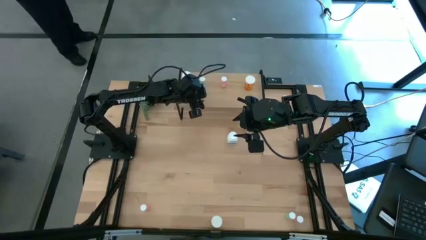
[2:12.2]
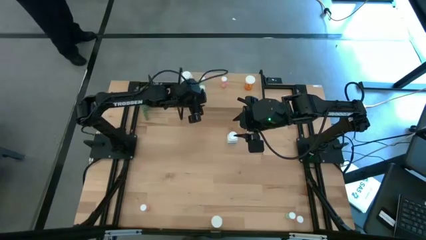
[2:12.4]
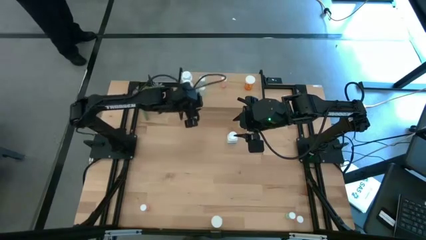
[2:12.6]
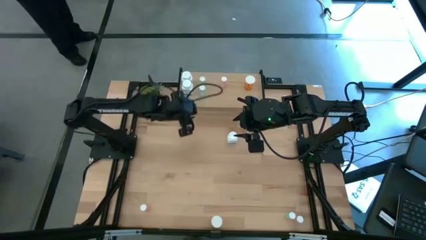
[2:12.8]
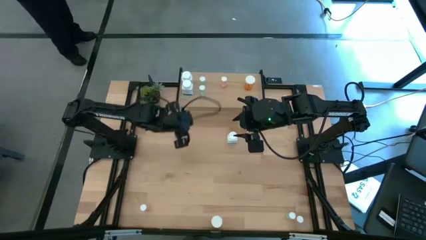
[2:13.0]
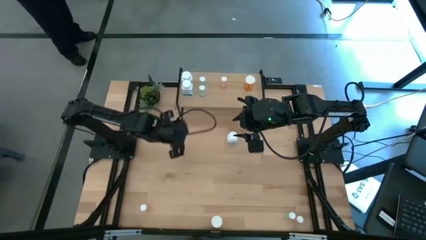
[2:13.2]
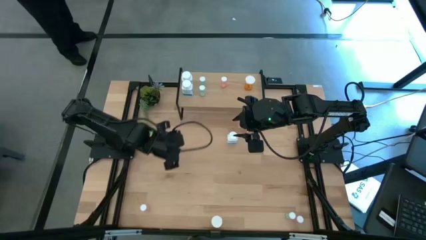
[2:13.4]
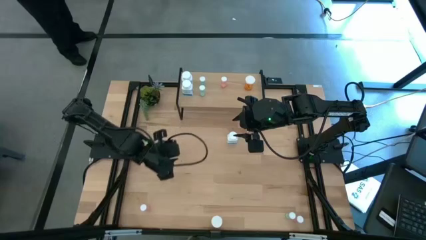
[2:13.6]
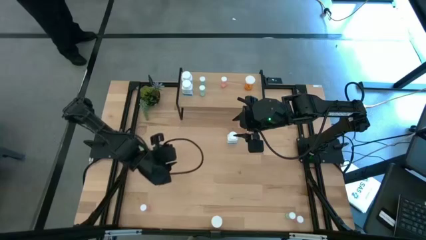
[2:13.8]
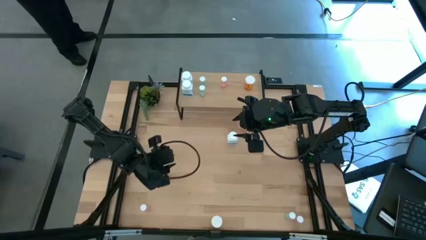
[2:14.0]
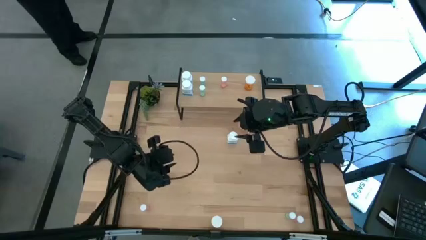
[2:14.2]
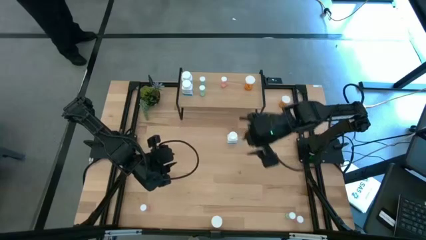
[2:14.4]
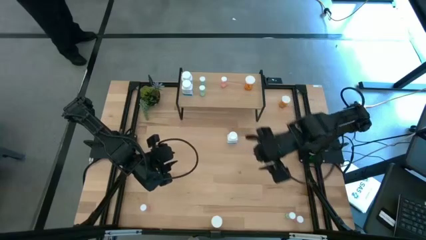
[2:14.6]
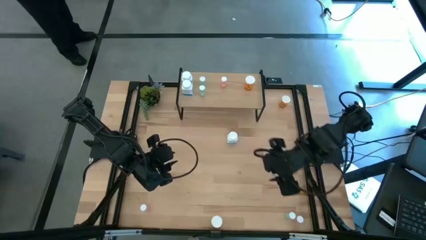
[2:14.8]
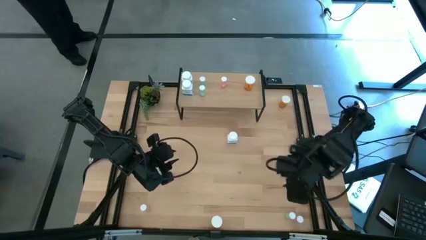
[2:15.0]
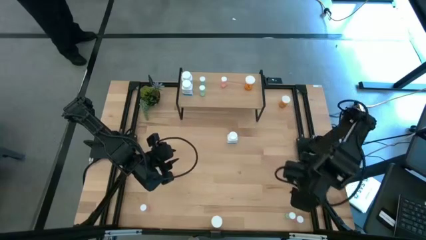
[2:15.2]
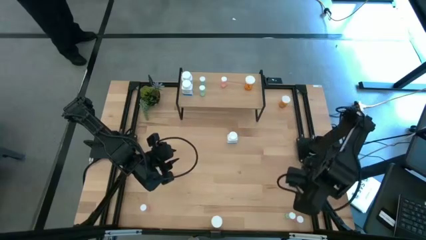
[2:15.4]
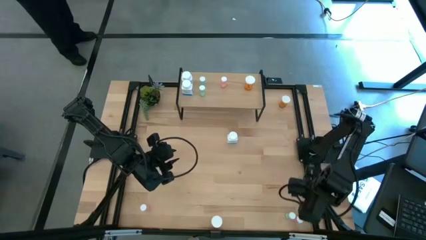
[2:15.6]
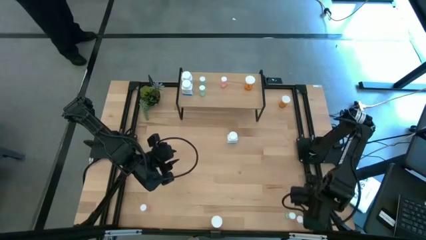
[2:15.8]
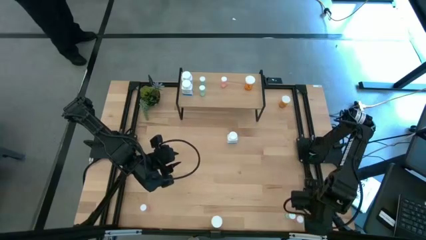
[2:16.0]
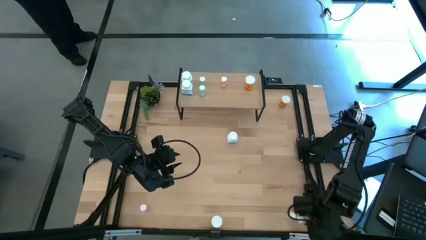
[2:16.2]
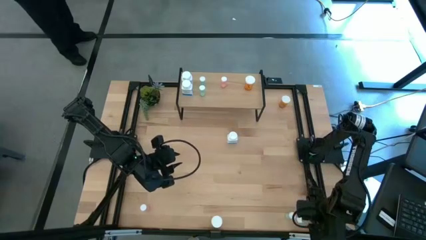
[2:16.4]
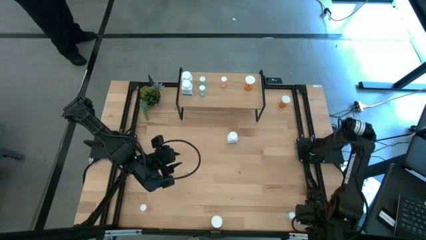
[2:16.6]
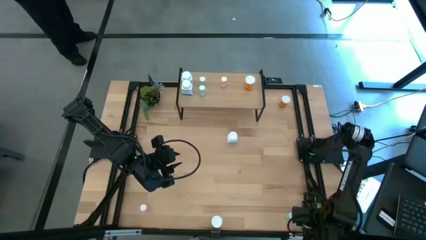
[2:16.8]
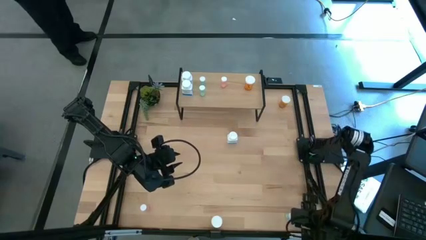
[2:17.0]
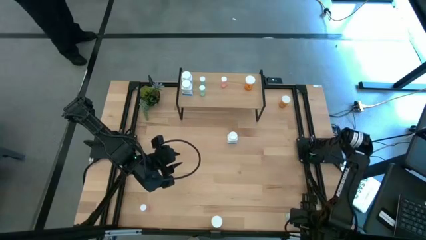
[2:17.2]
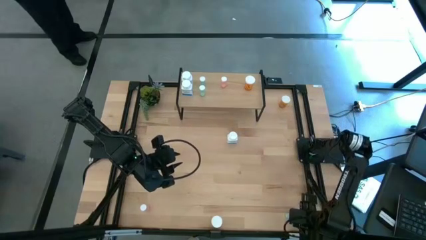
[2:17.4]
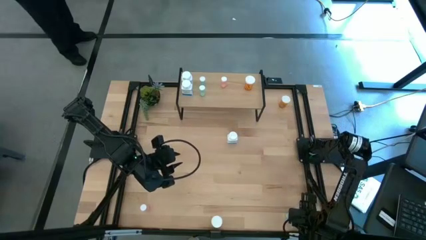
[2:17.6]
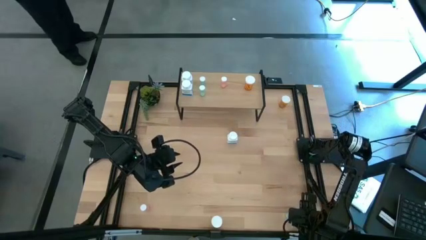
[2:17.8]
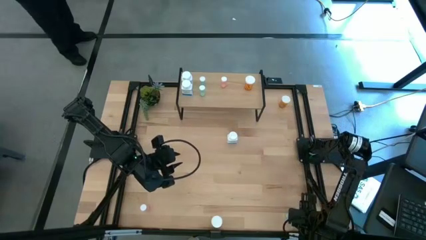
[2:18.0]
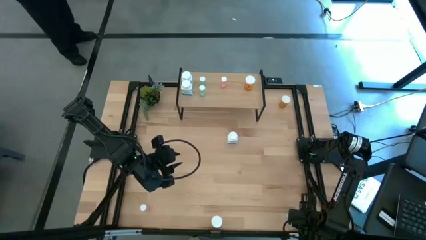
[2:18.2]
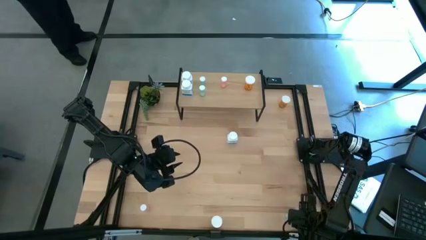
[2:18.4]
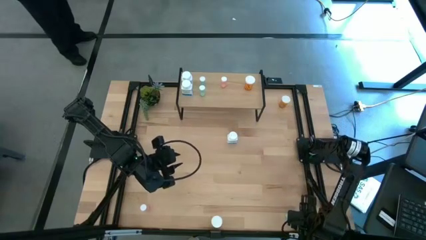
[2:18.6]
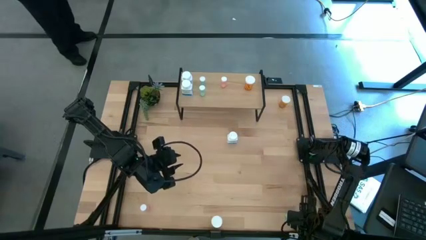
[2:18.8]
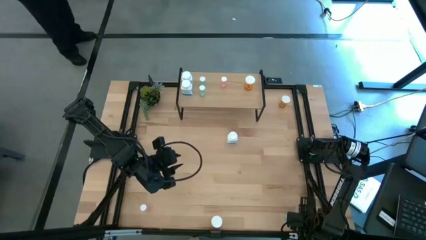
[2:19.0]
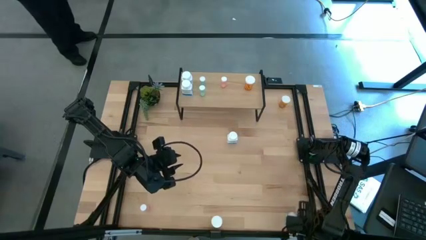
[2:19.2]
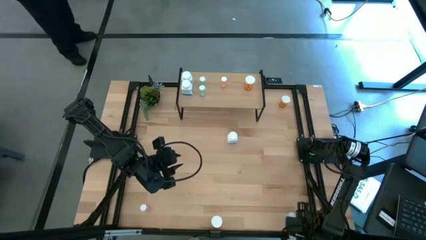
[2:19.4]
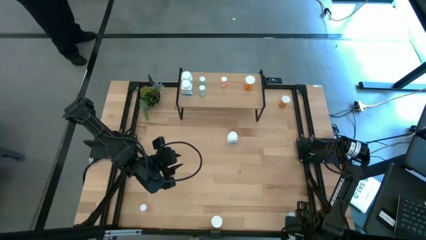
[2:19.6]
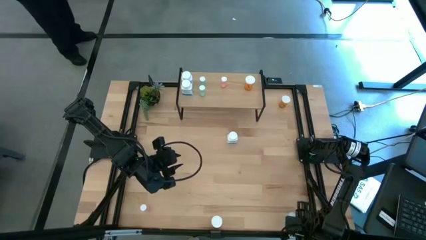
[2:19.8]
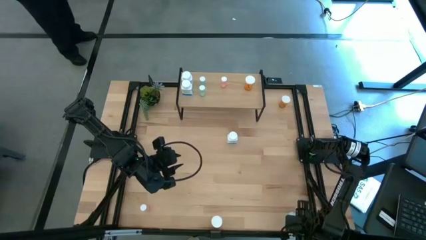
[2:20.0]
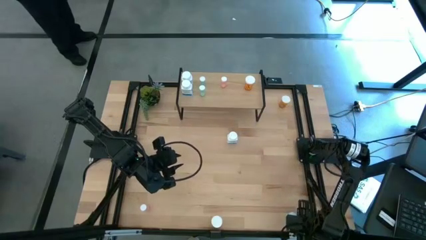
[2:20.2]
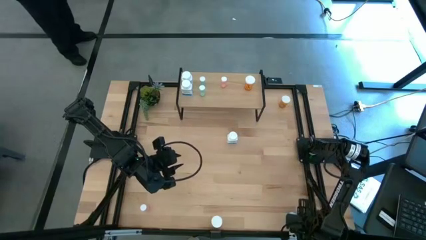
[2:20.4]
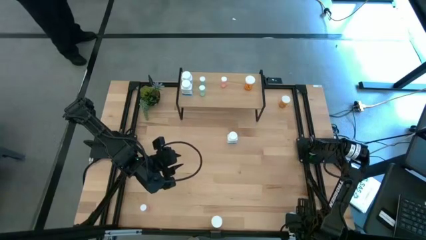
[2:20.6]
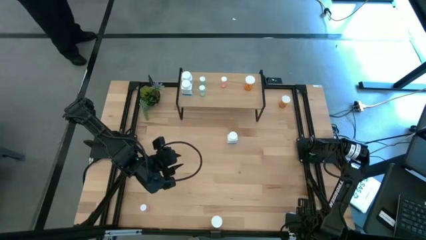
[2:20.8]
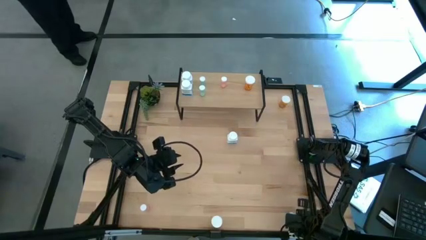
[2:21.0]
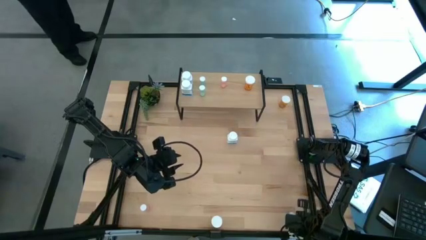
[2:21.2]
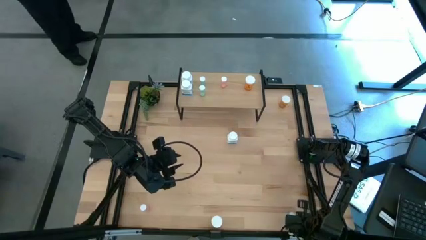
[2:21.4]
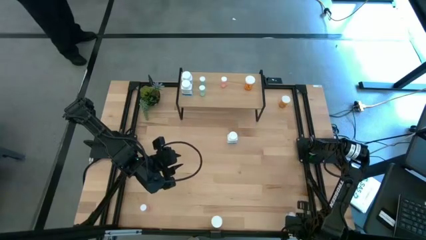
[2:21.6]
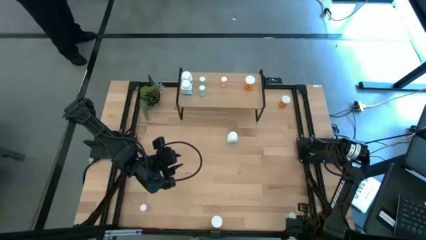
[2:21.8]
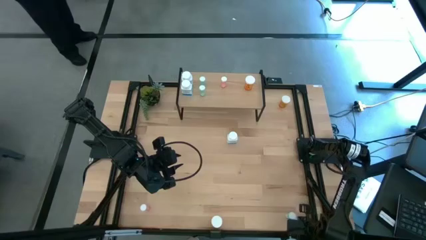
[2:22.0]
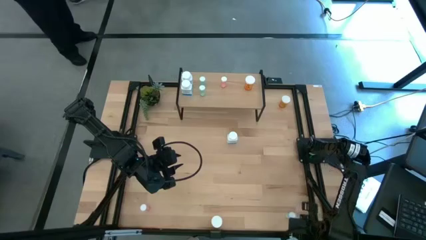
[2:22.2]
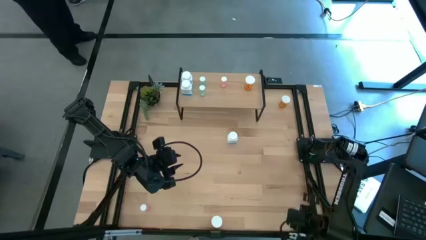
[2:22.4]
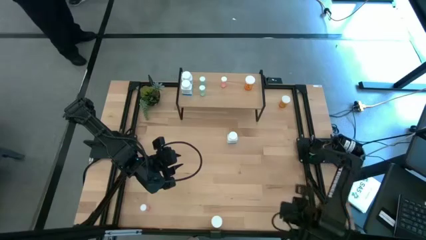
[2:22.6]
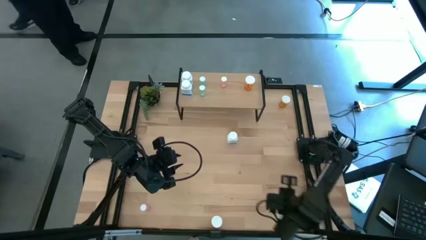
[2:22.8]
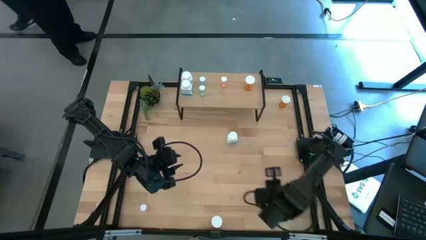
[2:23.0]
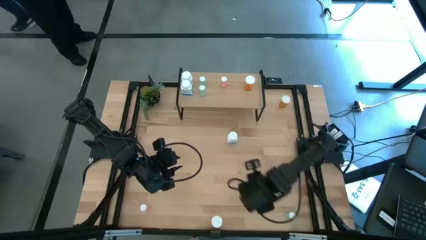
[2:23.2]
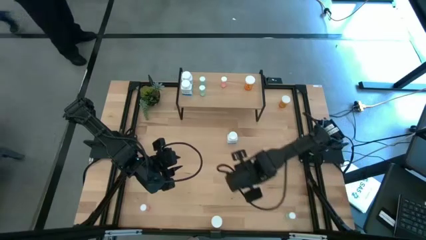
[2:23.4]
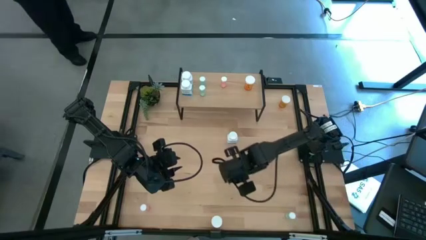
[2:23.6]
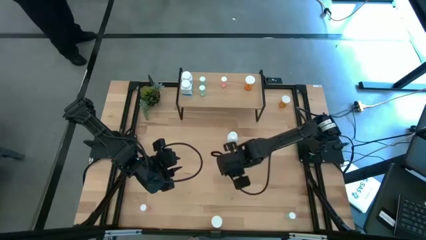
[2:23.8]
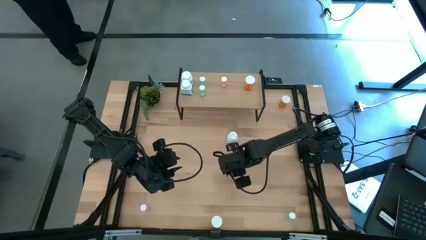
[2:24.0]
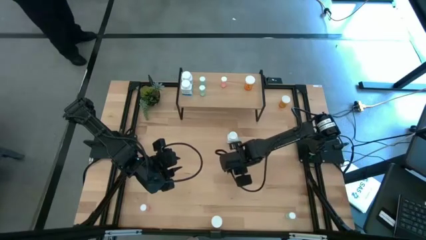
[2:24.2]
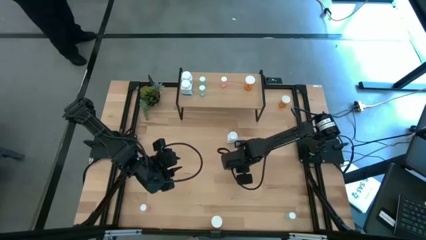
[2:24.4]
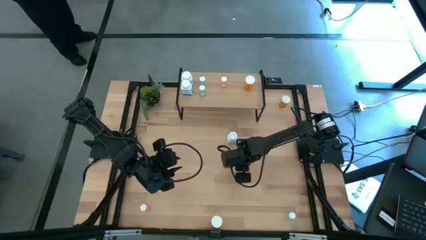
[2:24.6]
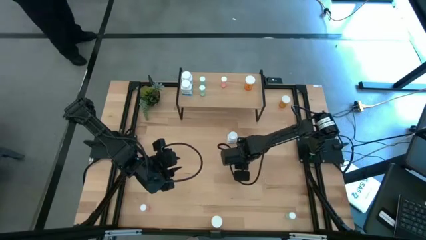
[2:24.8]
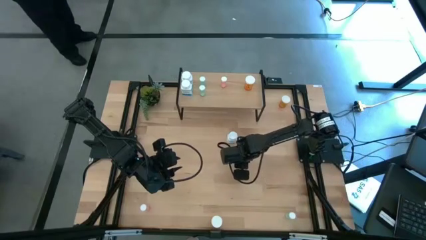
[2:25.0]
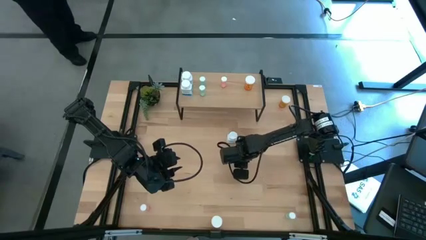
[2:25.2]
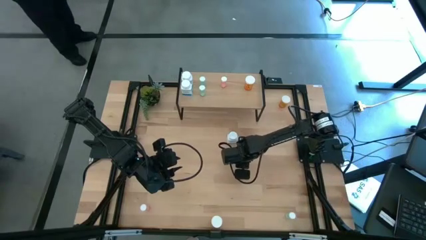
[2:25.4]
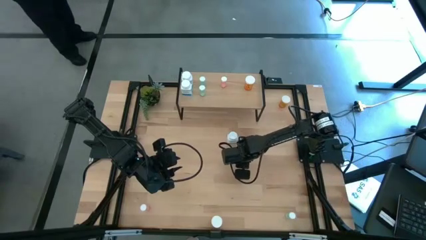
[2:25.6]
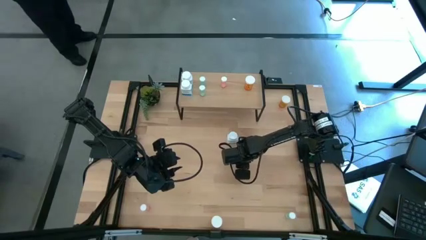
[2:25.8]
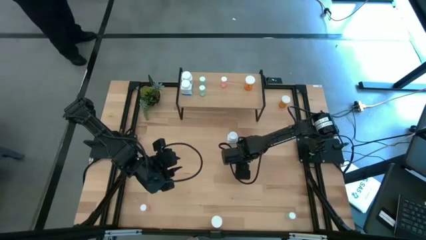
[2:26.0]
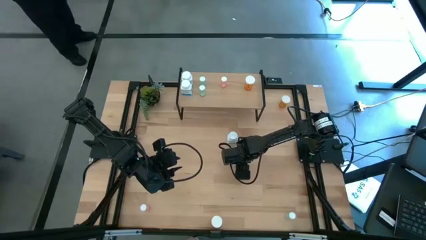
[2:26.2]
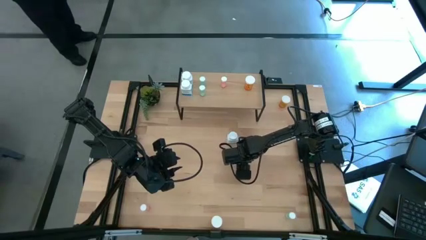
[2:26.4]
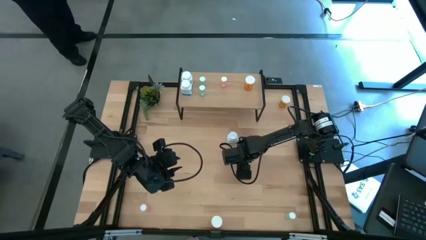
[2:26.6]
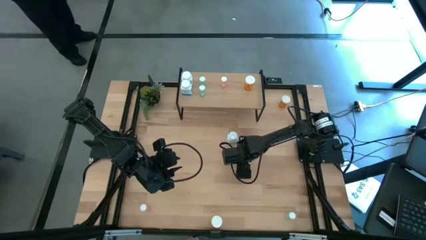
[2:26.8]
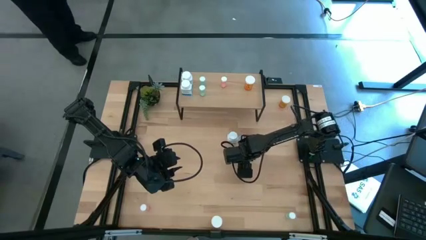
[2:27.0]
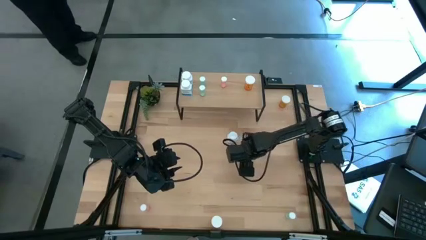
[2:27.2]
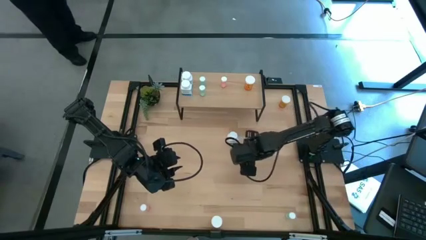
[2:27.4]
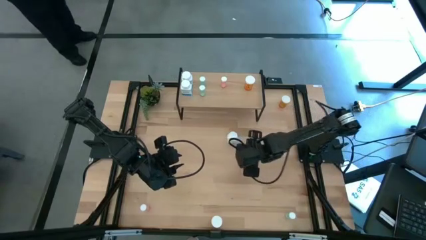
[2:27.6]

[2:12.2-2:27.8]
Task: Pick and place medicine bottles onto shelf by color
Put the right pink pill bottle on the shelf aligned with the other pink pill bottle

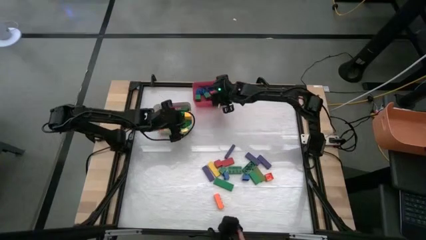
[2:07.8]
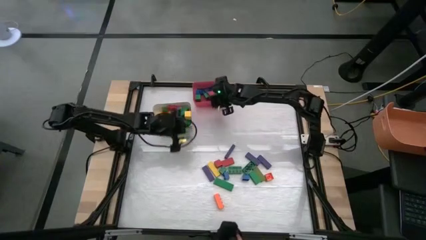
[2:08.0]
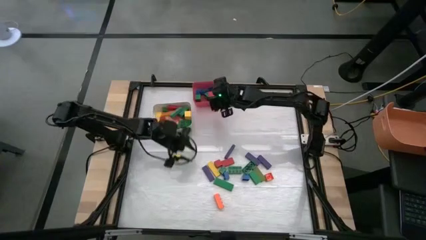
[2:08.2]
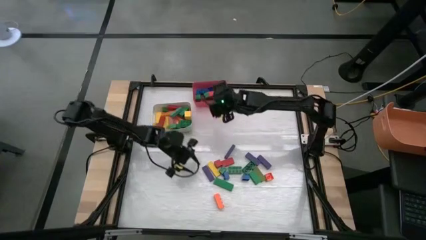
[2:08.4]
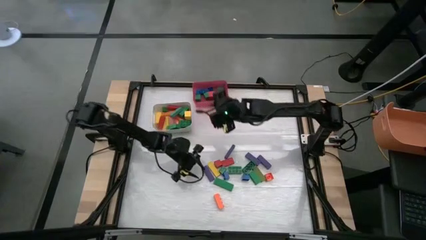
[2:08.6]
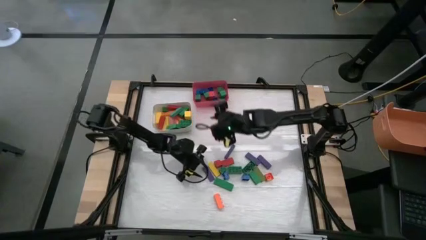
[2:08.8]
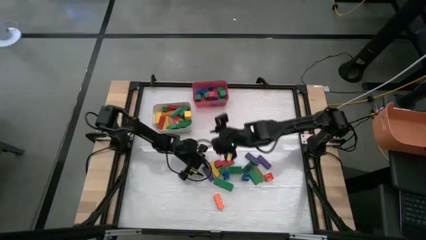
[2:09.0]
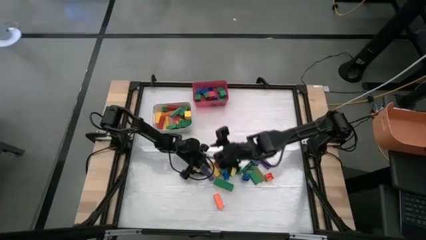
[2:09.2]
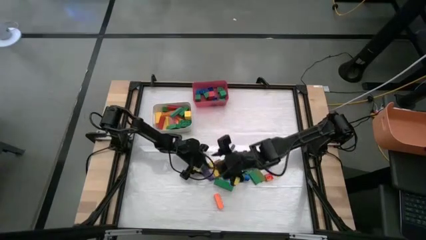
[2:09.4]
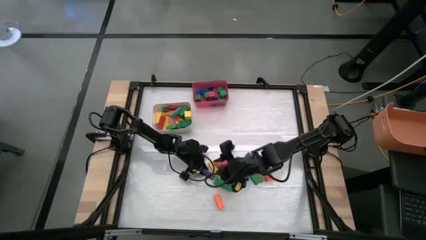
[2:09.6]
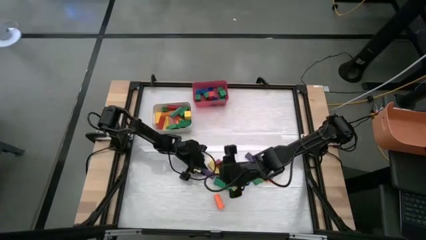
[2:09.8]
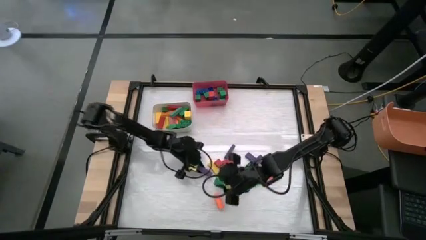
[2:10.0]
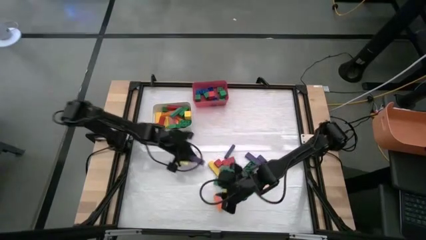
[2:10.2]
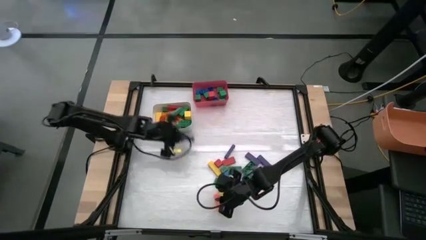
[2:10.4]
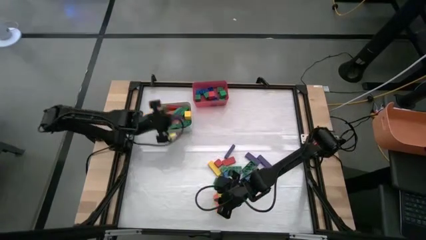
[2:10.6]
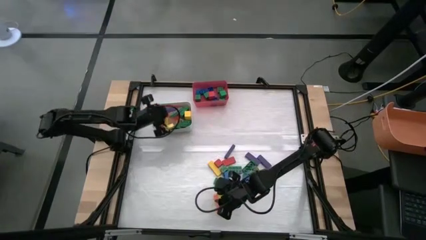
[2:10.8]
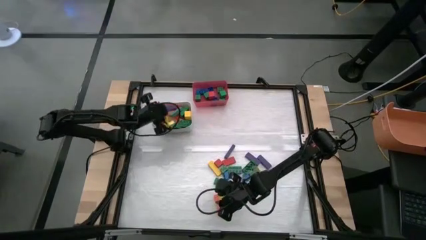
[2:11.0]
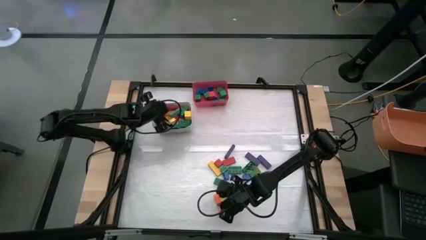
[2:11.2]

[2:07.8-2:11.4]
Task: Sort blocks by size
Put the large violet wooden block into the white bin
